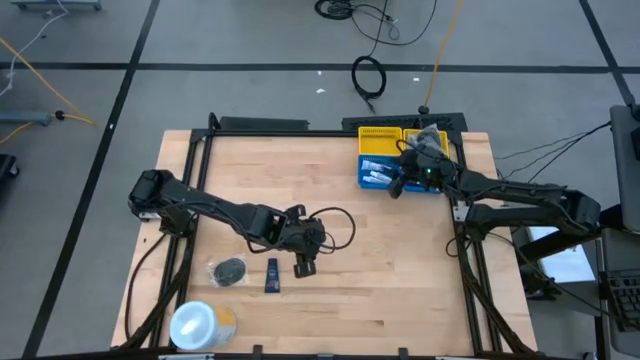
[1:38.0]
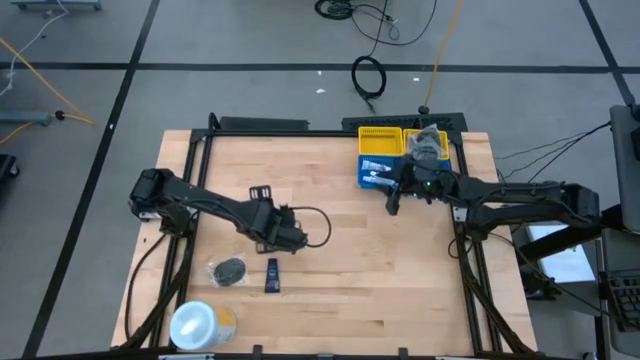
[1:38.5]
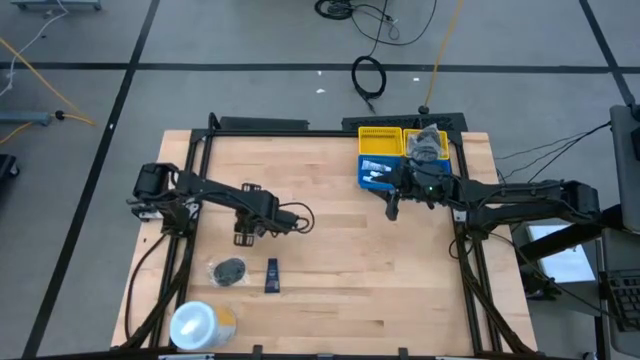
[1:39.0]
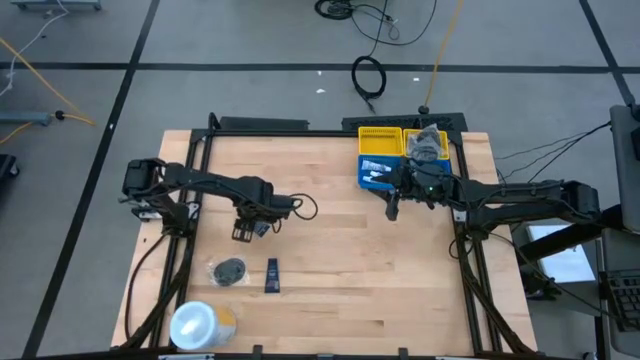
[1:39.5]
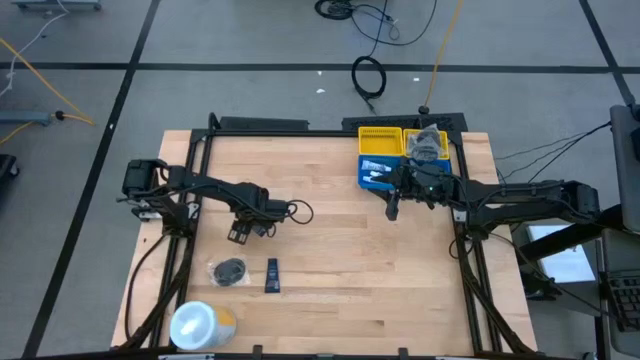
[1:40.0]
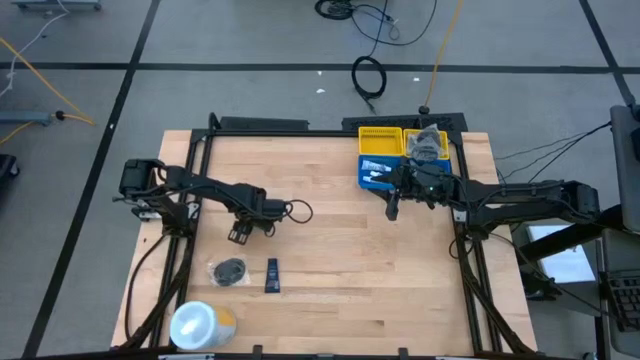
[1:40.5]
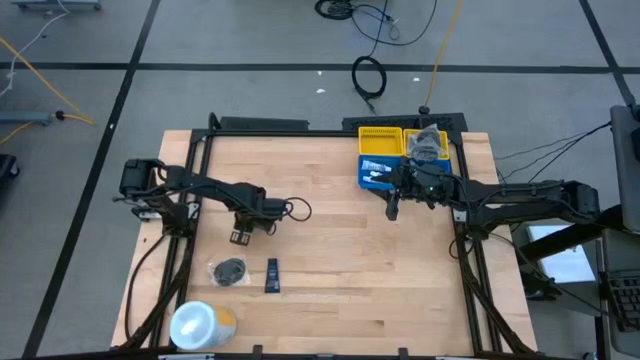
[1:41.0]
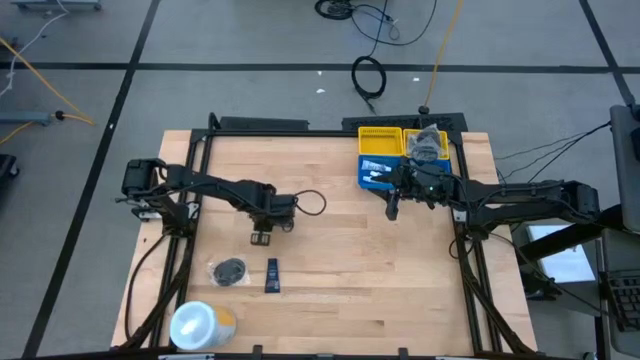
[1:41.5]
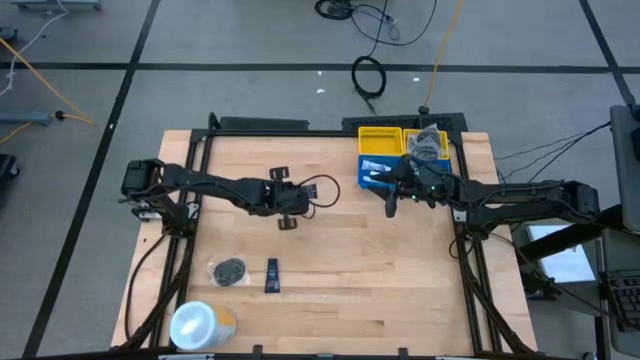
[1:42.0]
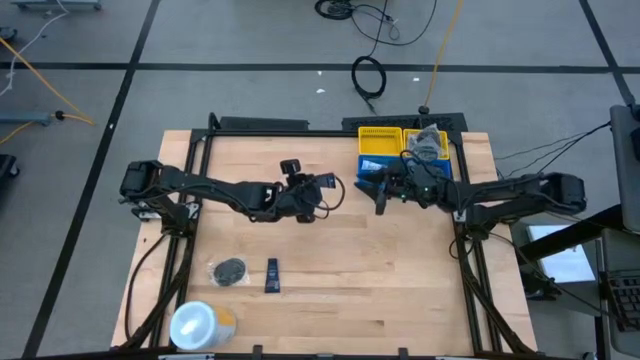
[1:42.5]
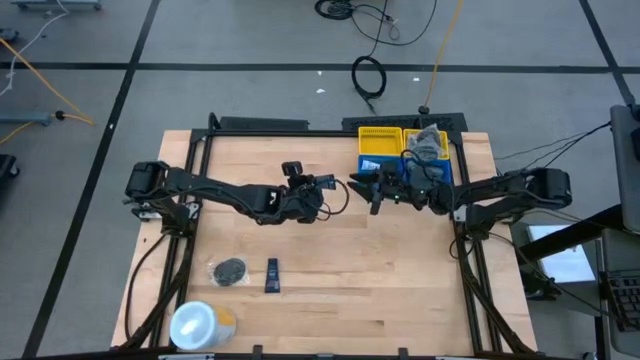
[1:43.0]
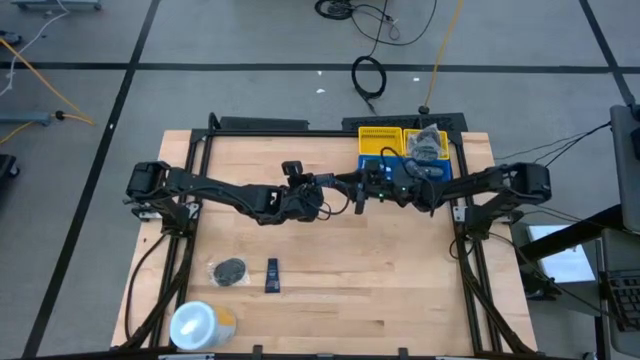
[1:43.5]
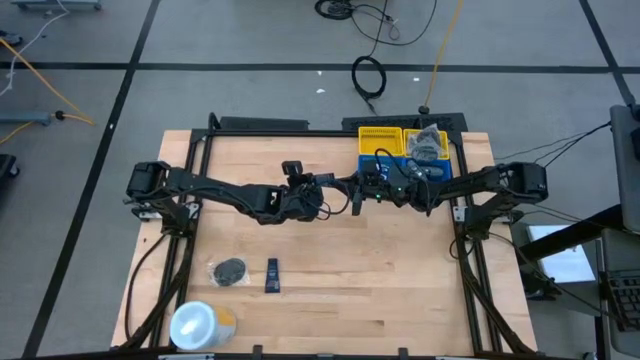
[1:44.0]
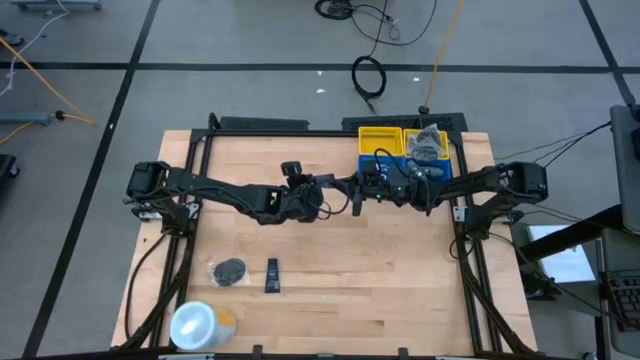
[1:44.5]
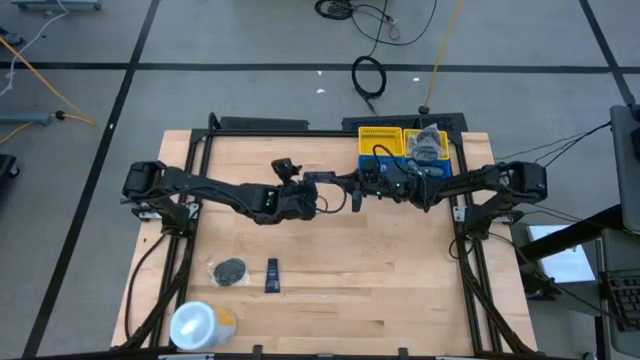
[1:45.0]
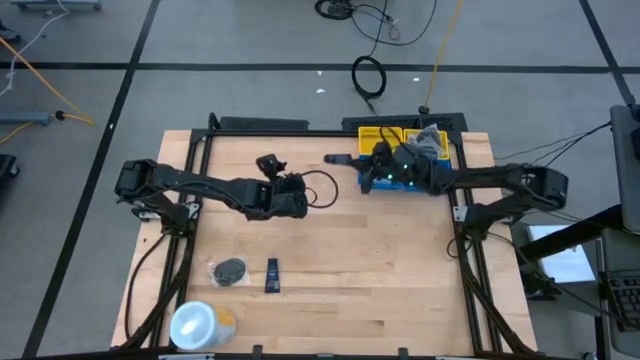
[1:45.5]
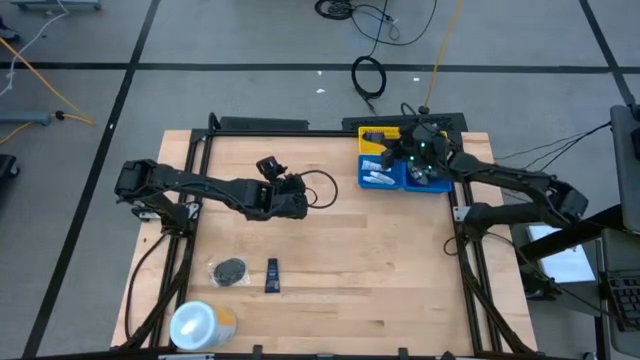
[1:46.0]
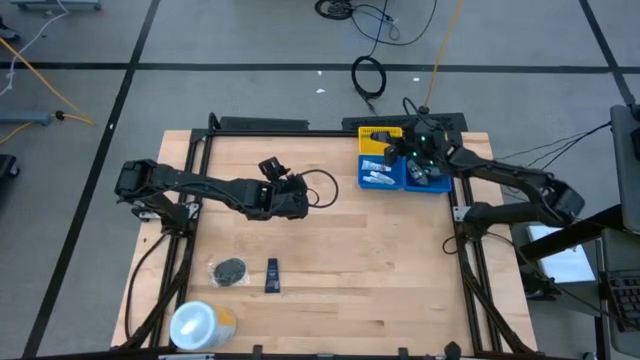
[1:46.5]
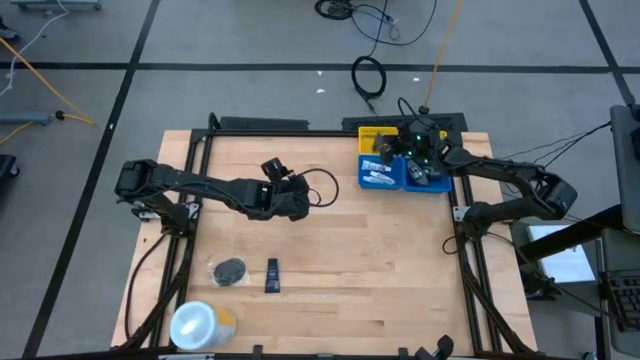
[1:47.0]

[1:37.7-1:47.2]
Task: Pick & Place Travel size toiletries
Put the blue shave cream into the left yellow basket

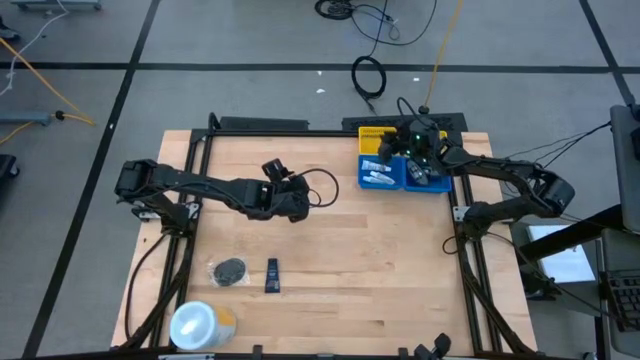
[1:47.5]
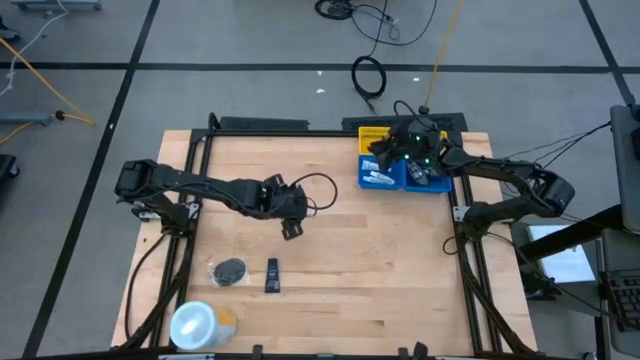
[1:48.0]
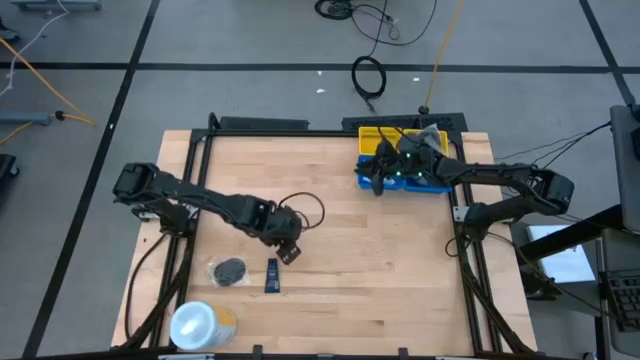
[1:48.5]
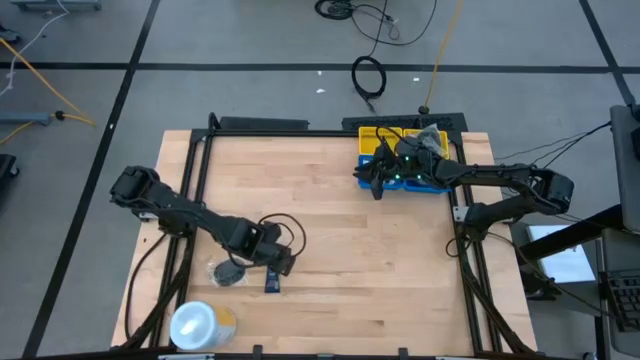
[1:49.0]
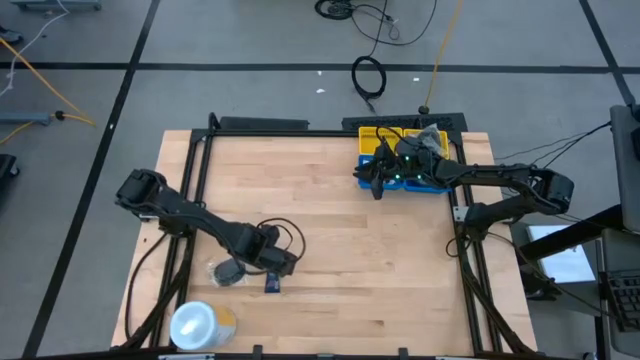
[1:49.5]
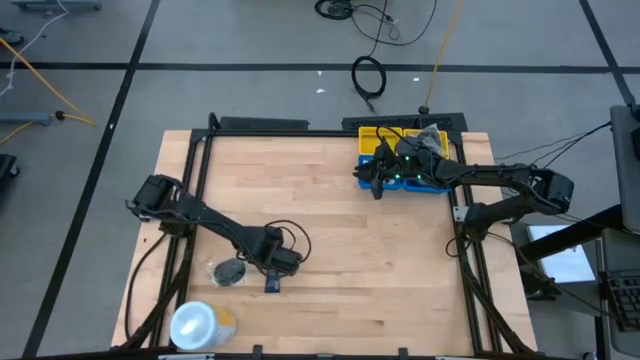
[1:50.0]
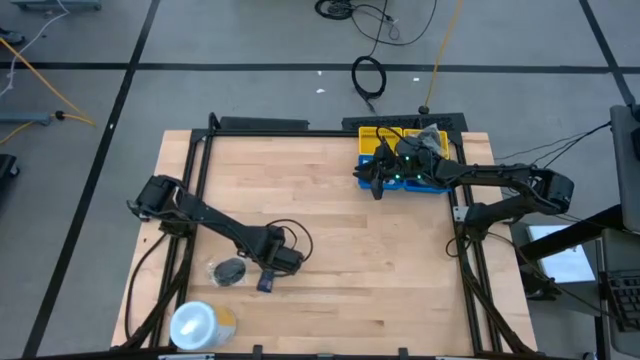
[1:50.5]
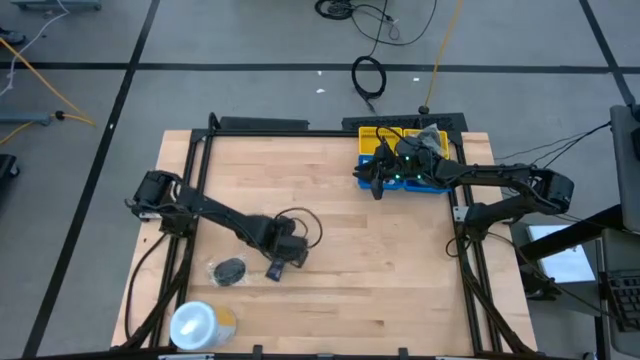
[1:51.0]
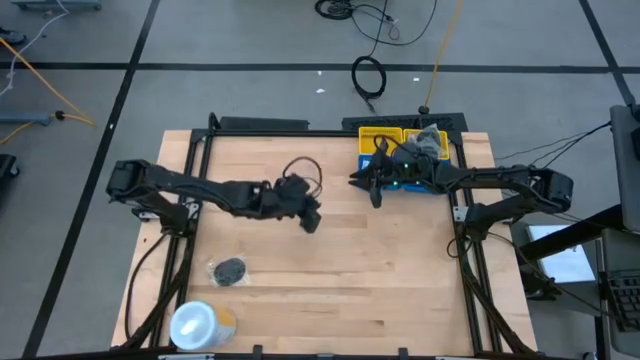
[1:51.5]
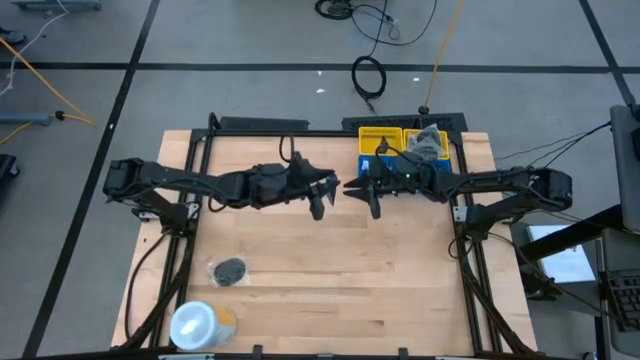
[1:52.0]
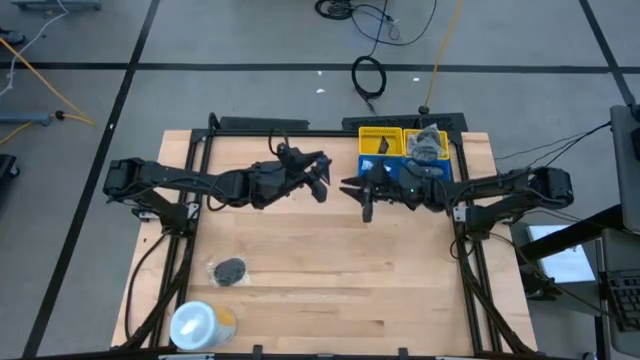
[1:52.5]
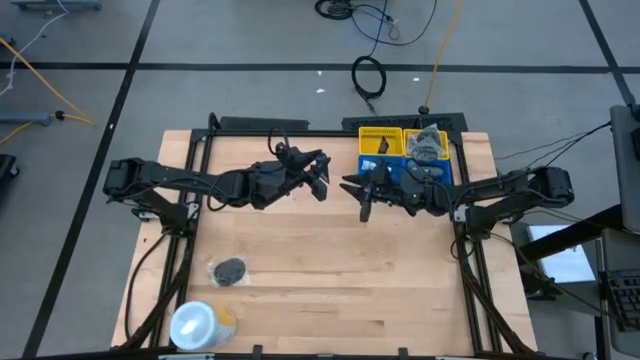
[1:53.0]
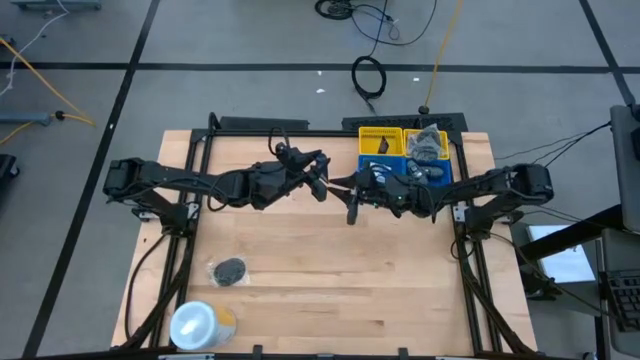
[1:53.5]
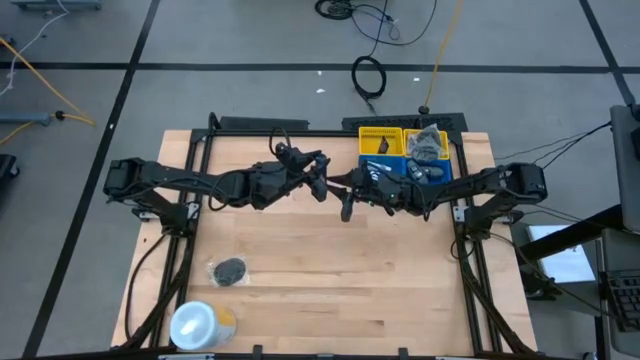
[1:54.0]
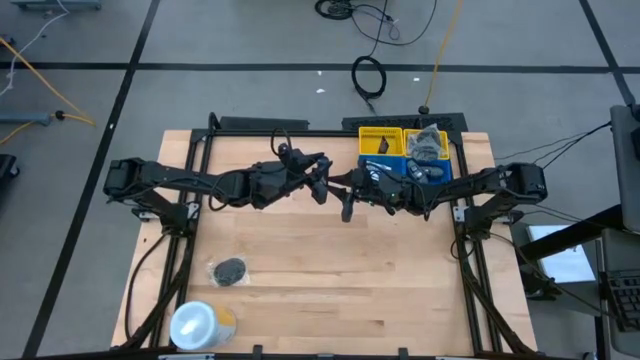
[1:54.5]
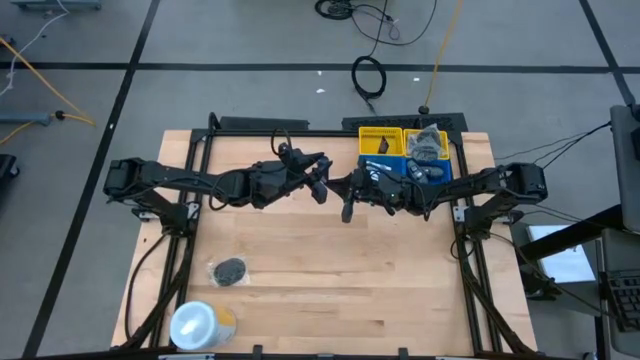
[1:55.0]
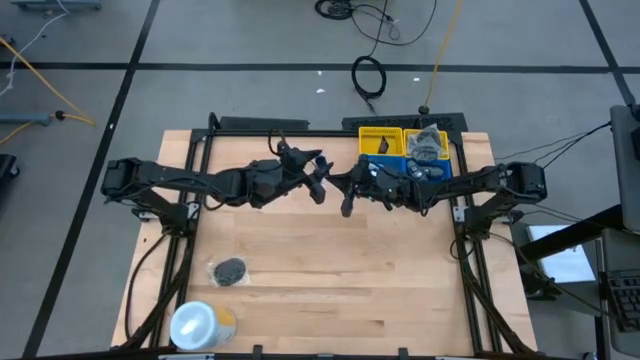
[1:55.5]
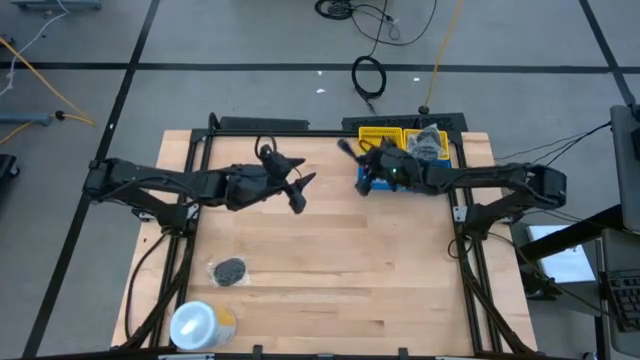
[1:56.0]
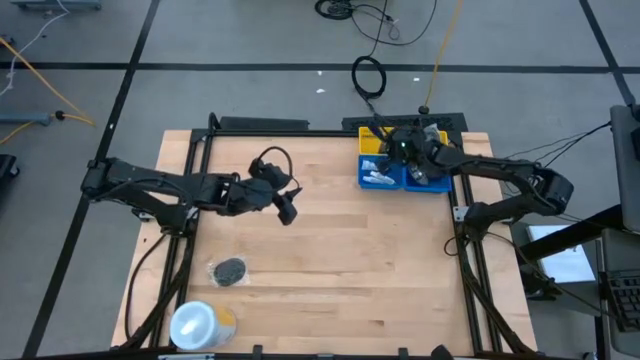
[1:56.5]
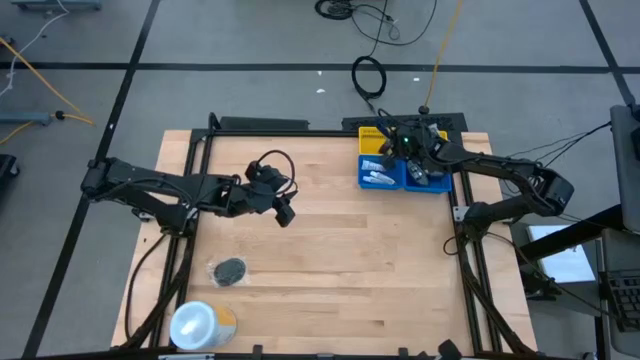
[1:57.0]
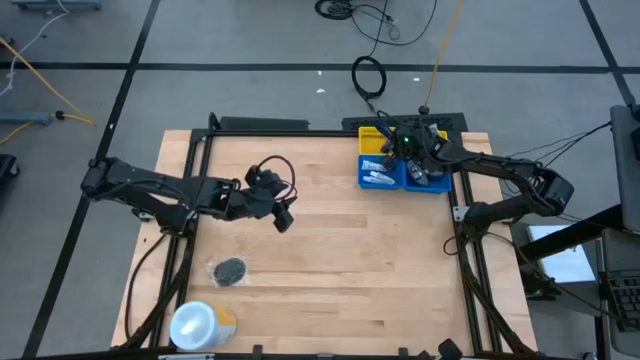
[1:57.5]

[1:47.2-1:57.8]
Put the blue shave cream into the left yellow basket

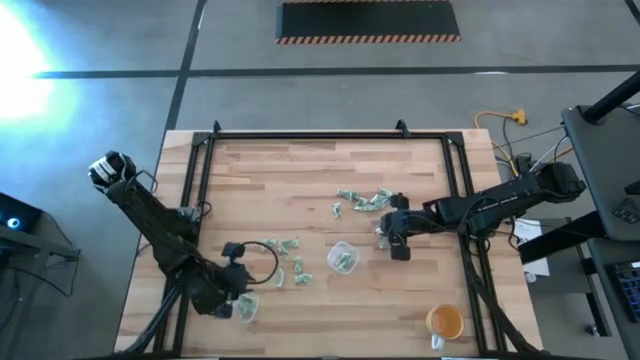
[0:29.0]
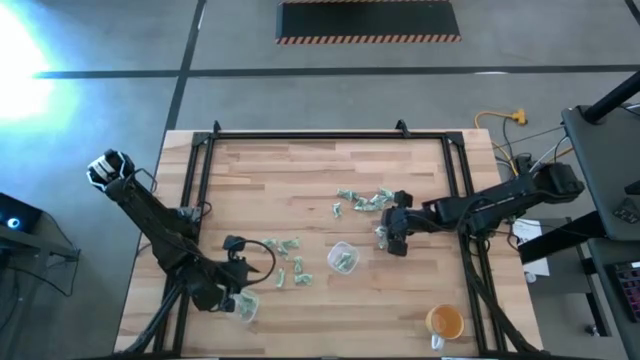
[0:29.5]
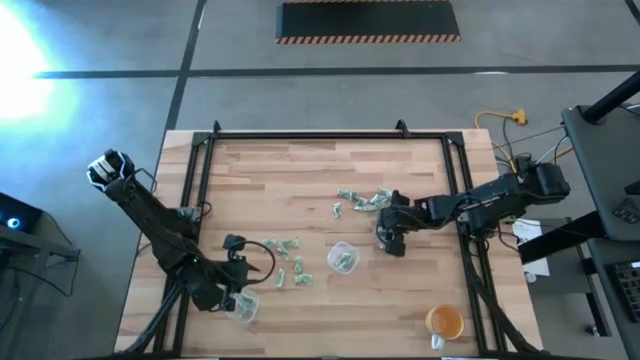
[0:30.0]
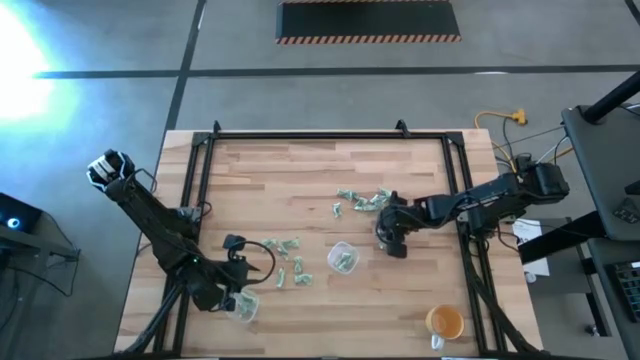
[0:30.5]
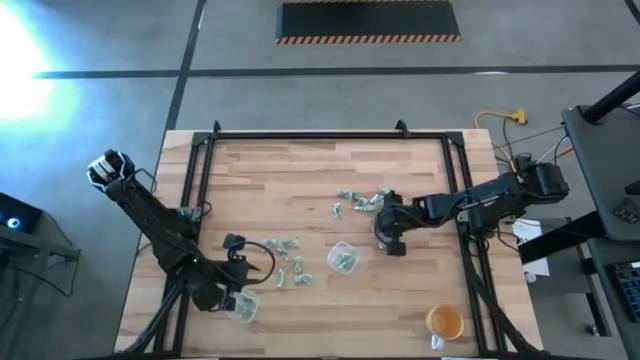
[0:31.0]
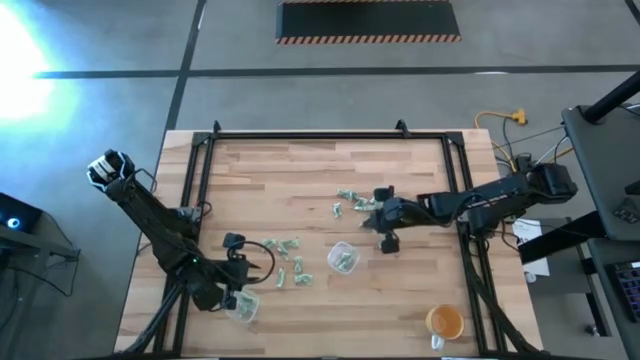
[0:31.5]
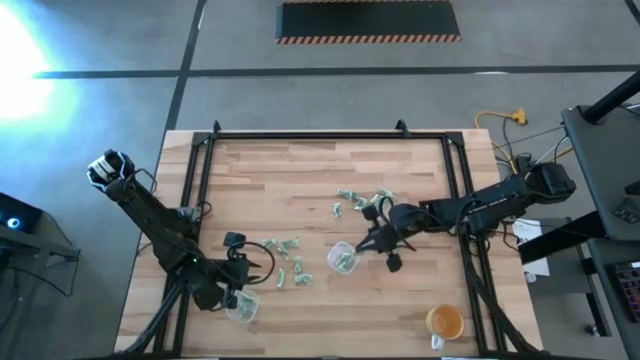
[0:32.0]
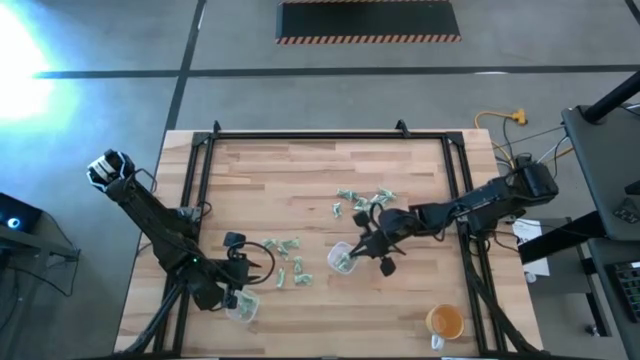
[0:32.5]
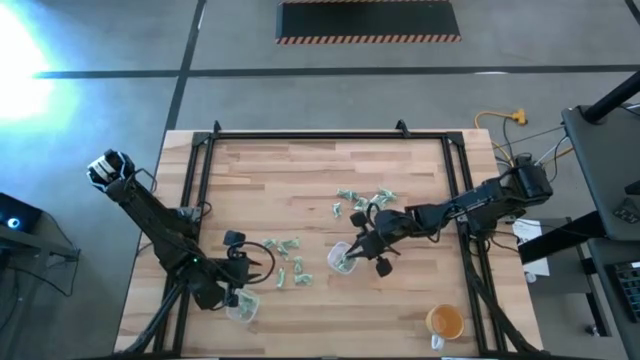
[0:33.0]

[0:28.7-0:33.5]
Task: Pick and place items into bin
Put the light green packet into the top transparent bin
